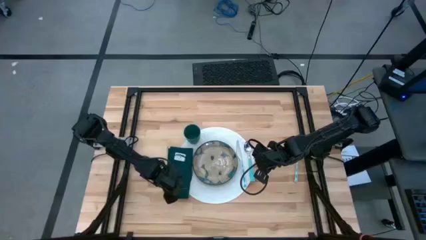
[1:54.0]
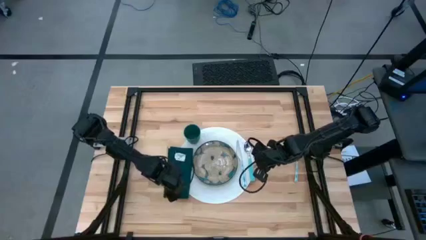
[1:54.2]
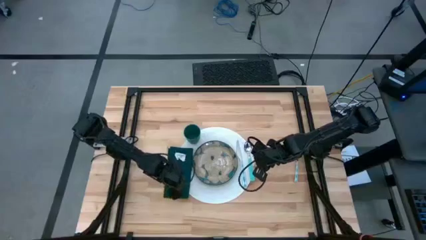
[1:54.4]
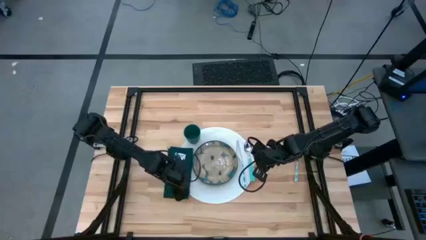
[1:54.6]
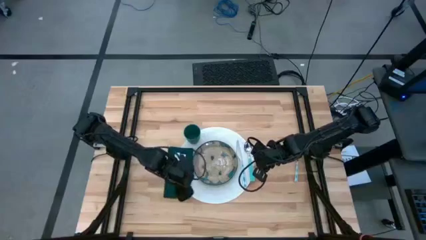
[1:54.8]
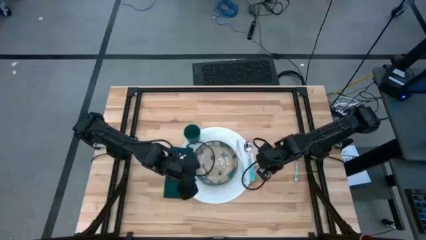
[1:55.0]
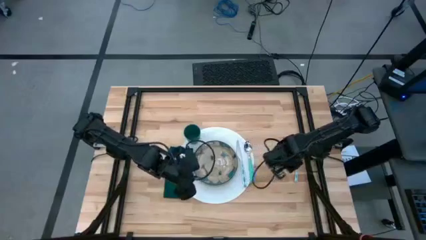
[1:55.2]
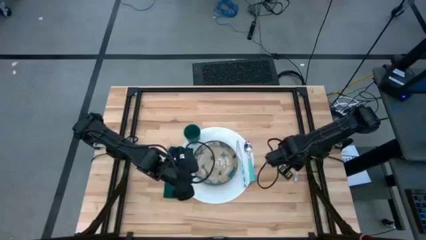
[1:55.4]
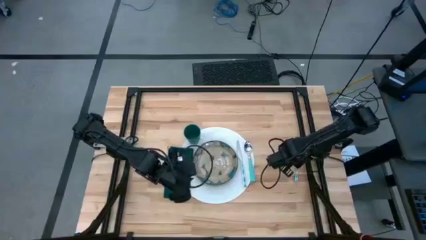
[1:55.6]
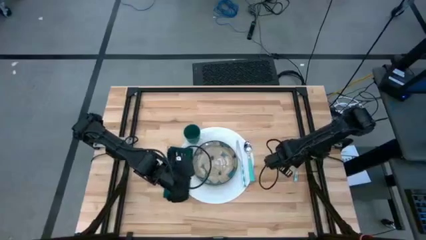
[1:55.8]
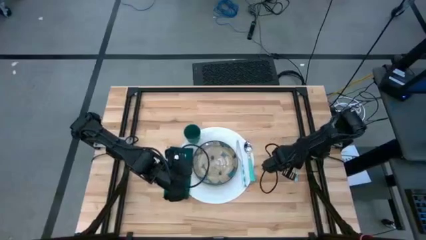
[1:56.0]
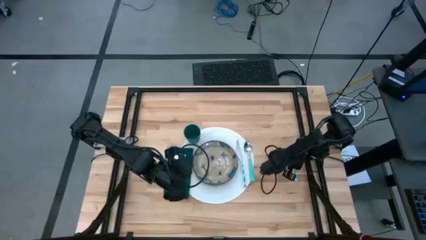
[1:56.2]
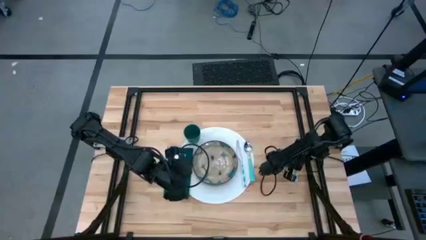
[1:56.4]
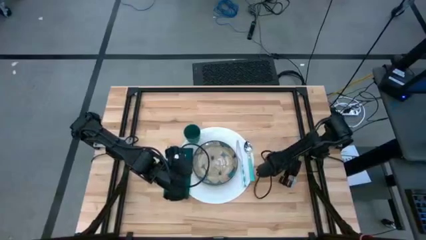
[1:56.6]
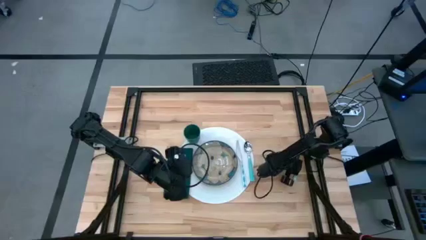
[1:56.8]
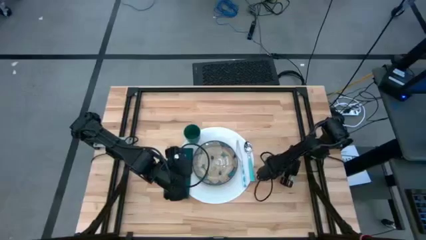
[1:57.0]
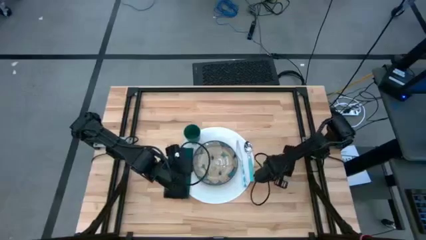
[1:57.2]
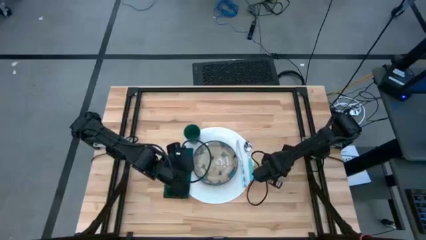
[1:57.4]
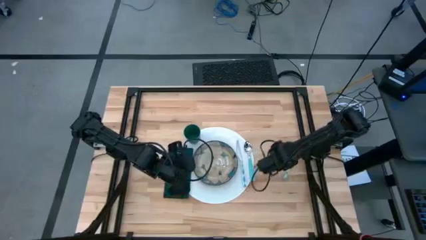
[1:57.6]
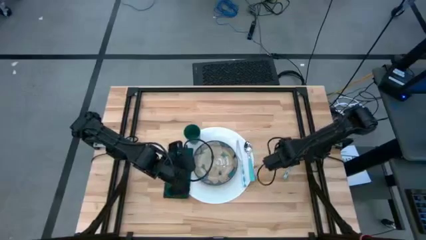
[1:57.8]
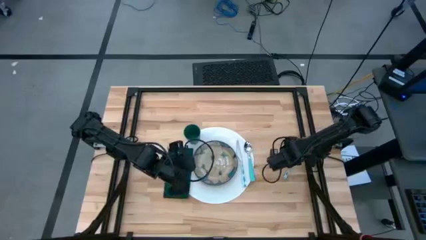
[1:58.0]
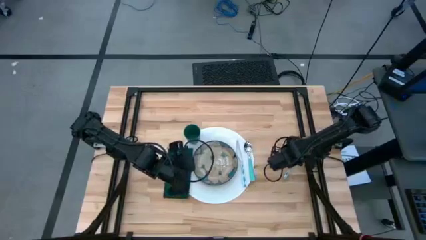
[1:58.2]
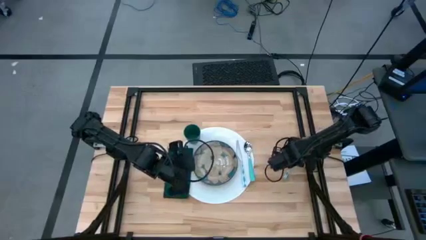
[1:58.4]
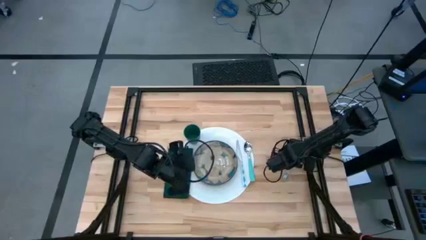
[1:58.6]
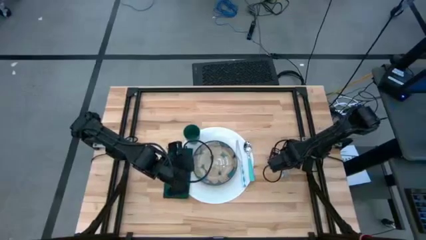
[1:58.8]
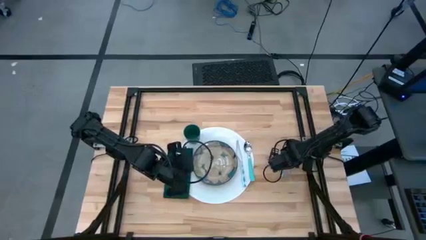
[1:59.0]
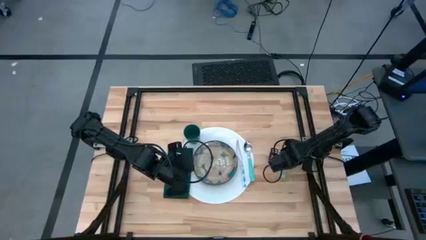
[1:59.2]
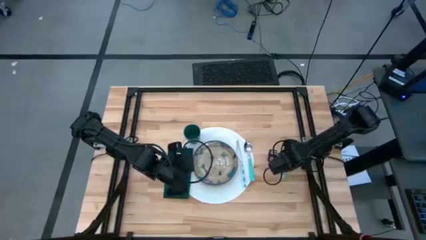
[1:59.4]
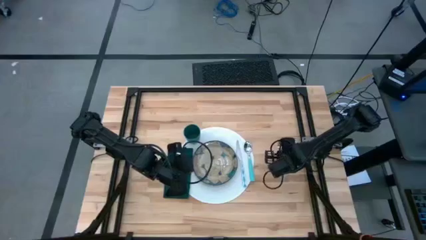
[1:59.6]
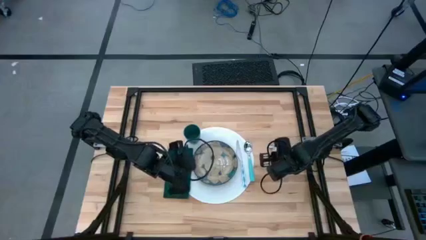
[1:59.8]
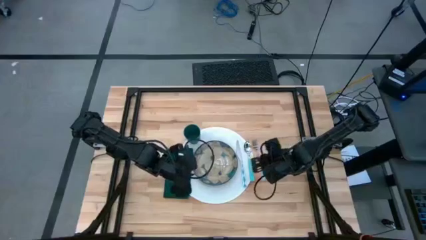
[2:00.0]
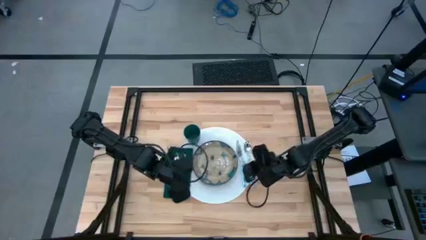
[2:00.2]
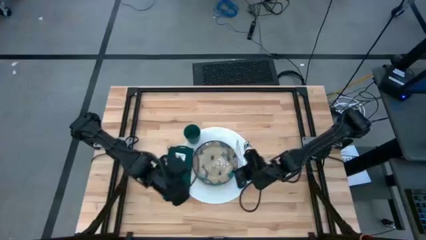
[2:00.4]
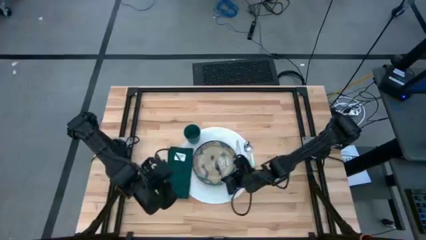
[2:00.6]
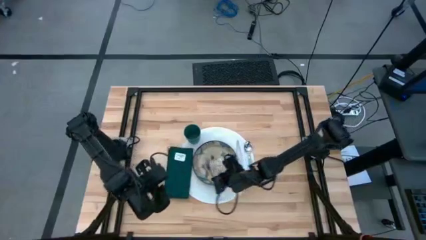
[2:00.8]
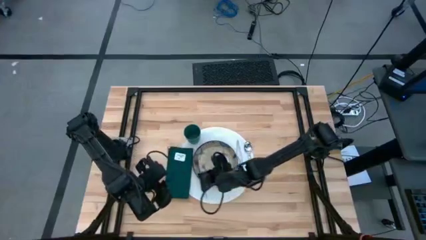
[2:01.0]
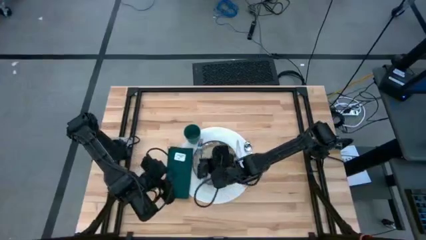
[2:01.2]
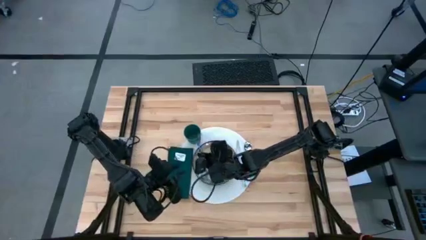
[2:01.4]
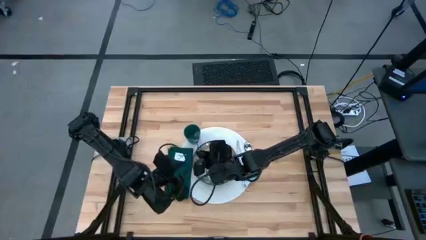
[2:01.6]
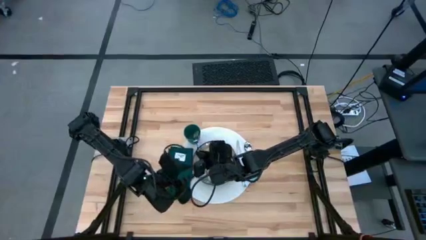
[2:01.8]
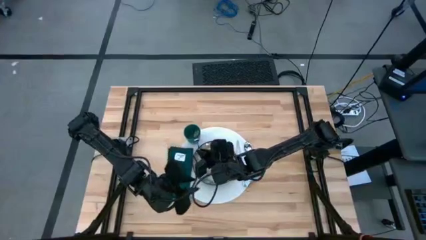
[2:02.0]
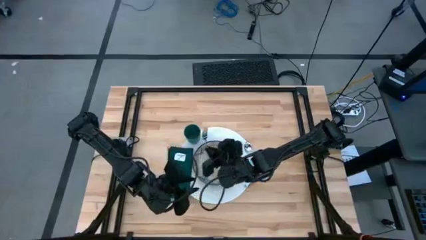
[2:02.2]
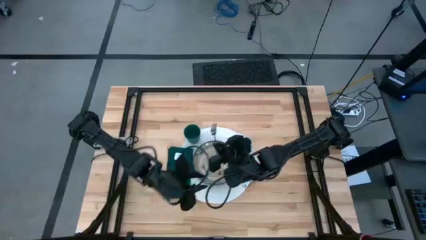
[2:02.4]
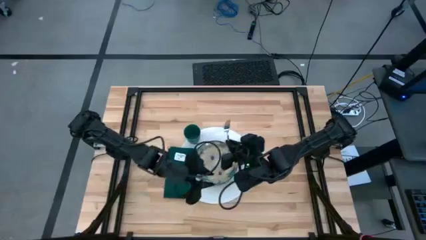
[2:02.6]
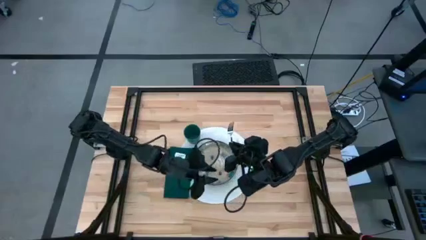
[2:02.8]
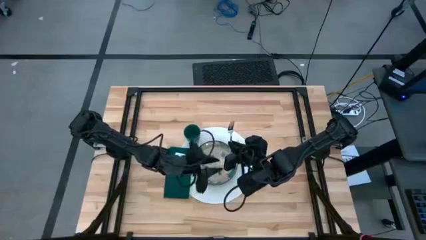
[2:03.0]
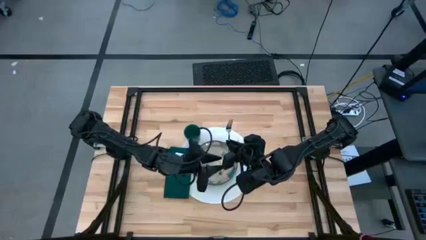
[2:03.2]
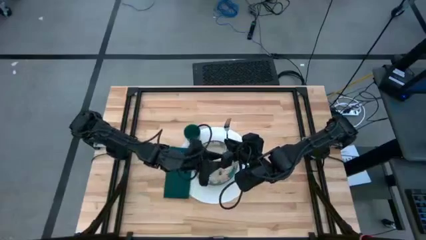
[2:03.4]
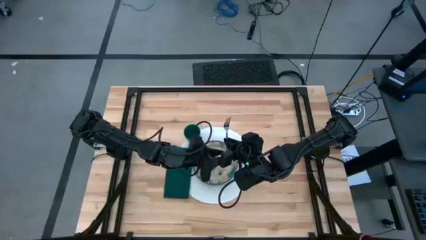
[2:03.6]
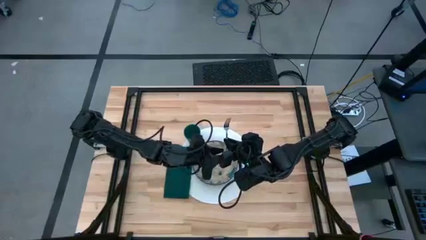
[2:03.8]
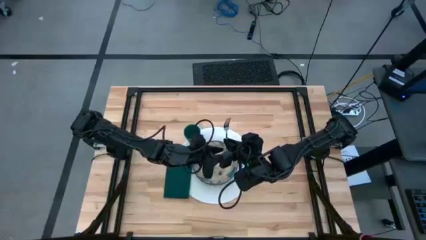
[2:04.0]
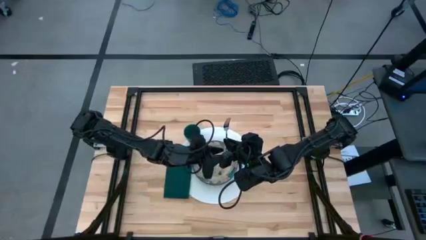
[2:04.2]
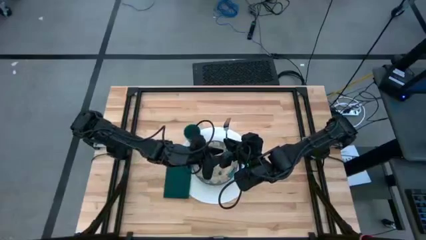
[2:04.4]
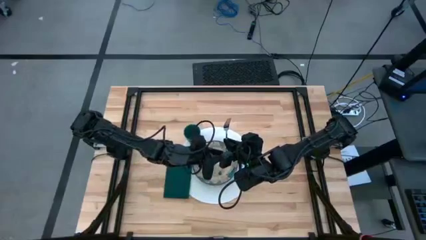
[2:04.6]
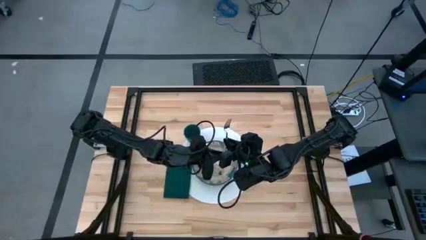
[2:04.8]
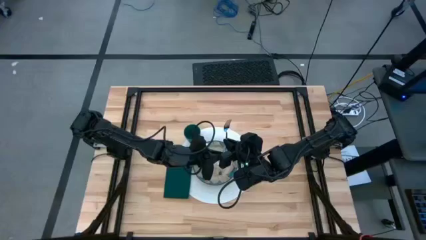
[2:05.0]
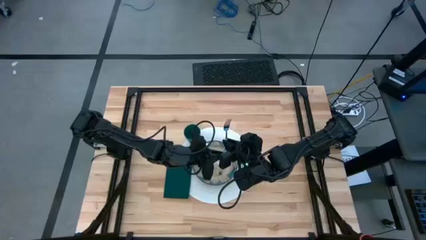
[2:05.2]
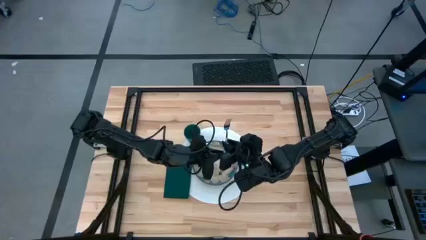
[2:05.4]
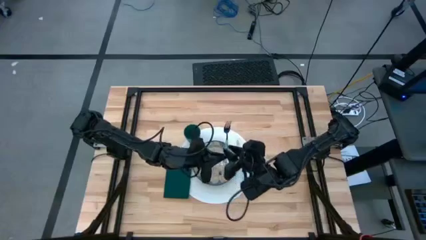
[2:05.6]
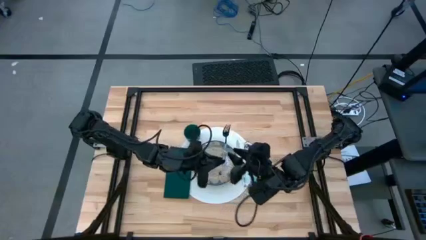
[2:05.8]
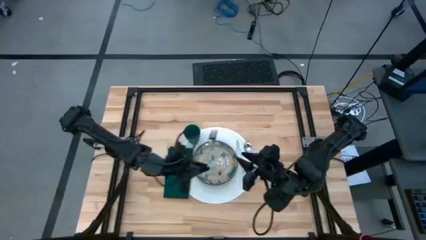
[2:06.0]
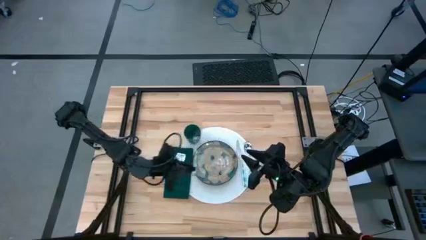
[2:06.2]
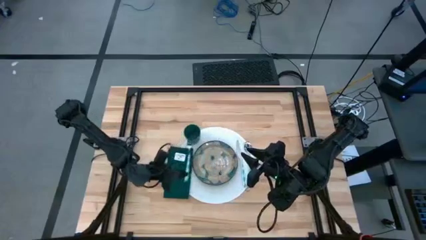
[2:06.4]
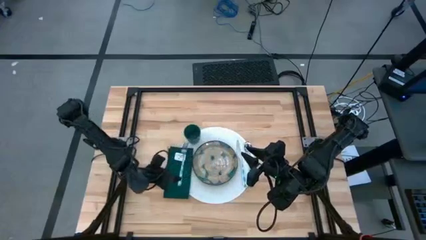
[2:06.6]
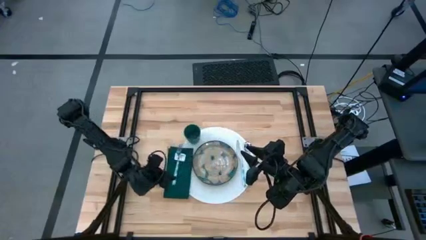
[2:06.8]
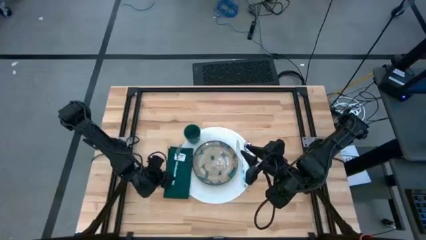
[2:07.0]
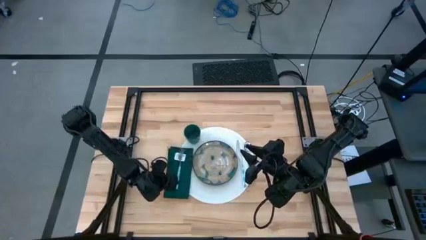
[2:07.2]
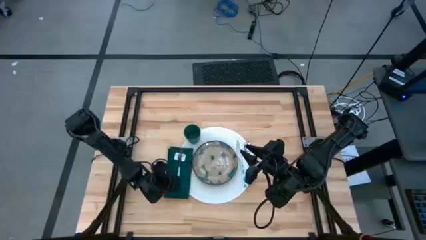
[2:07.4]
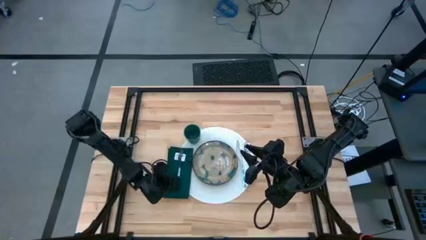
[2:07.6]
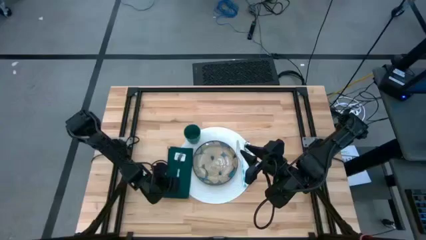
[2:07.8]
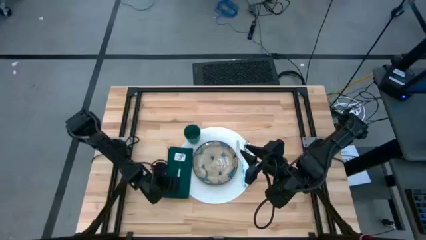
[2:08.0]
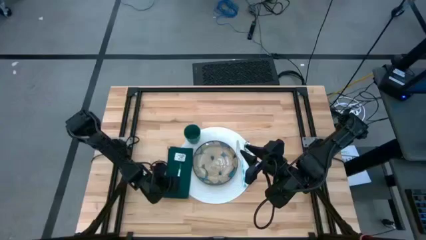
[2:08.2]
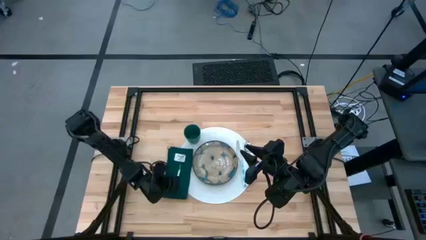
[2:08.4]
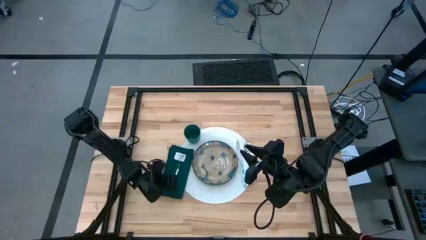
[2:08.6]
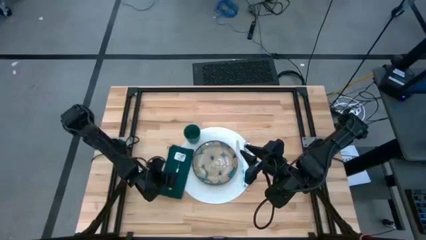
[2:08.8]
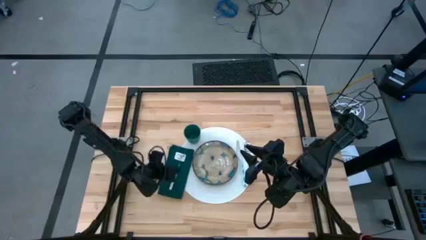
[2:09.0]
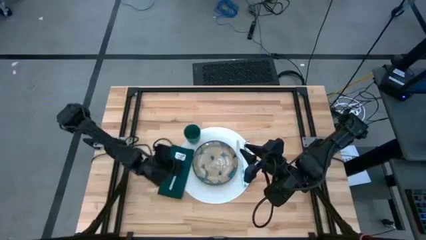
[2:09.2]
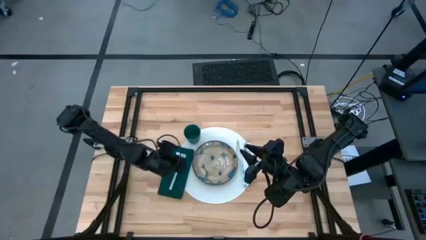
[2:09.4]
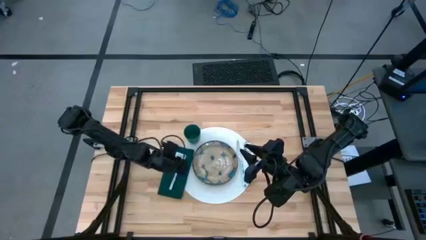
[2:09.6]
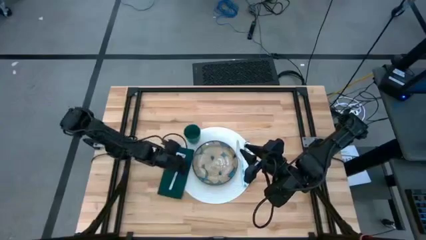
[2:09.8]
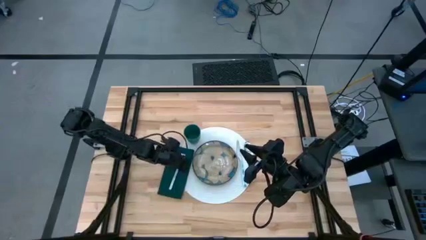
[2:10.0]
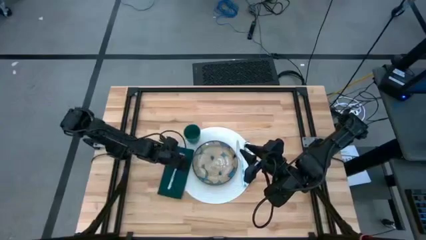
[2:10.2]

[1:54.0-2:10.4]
Task: Set table place
Put the blue fork on the green napkin

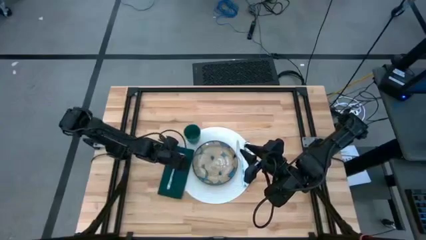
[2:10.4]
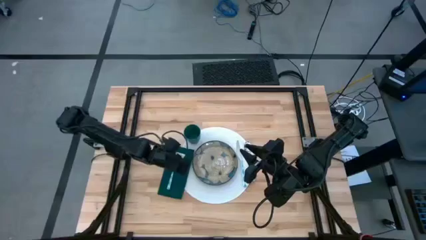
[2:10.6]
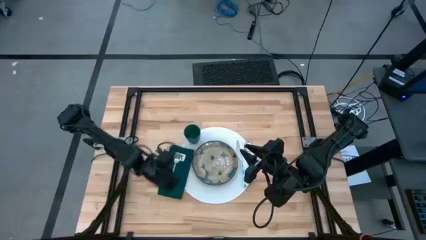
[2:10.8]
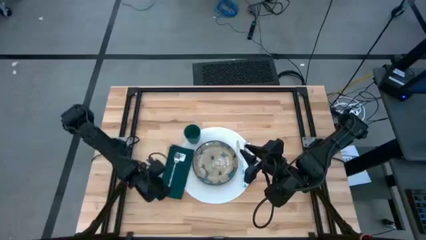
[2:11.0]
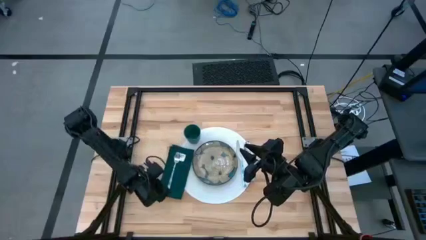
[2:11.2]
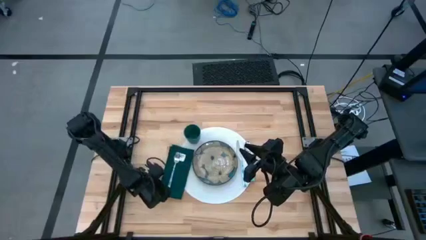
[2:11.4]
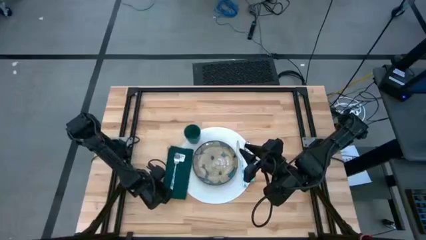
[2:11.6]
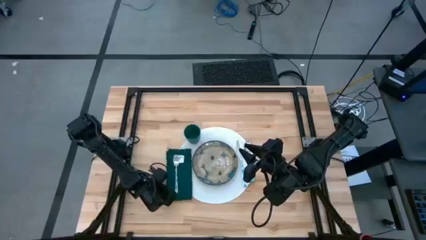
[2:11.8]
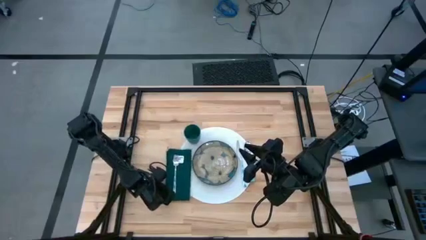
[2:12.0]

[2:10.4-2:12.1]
Adjust the dark green napkin
